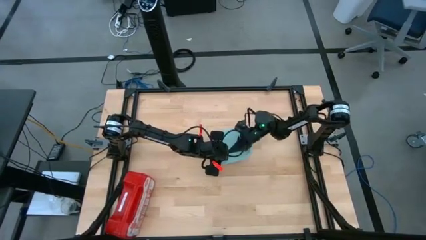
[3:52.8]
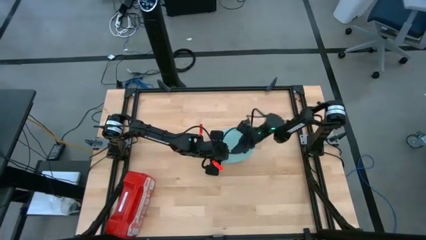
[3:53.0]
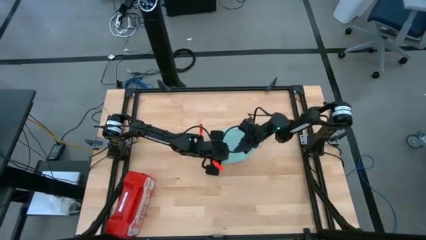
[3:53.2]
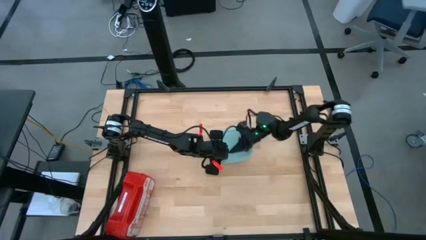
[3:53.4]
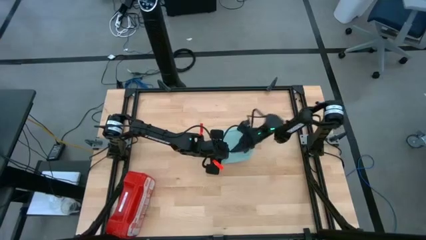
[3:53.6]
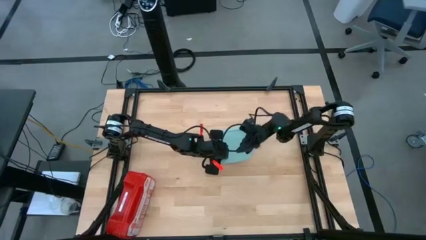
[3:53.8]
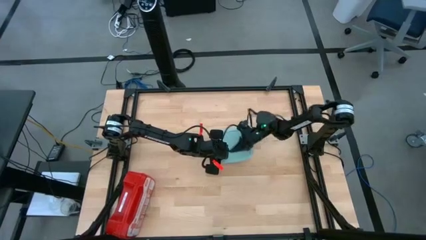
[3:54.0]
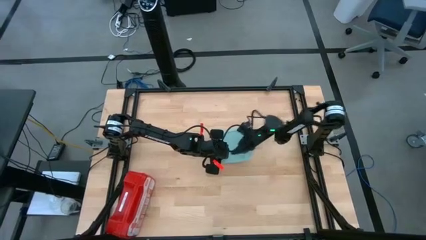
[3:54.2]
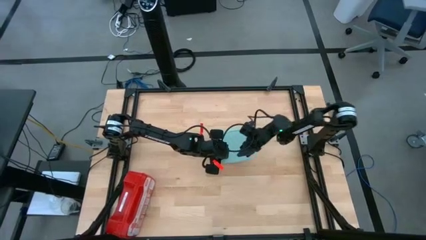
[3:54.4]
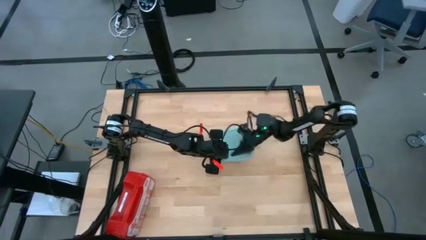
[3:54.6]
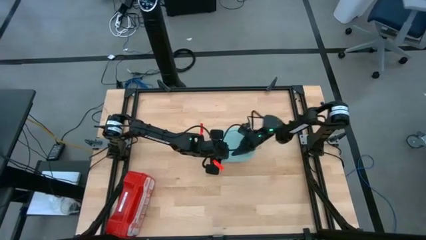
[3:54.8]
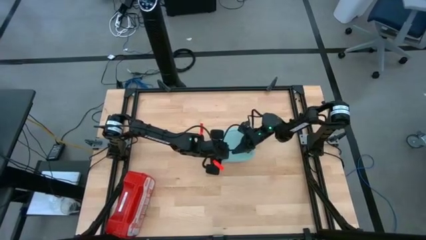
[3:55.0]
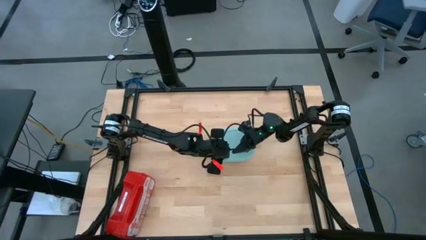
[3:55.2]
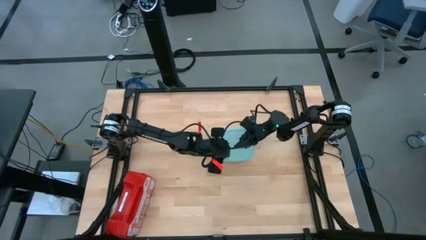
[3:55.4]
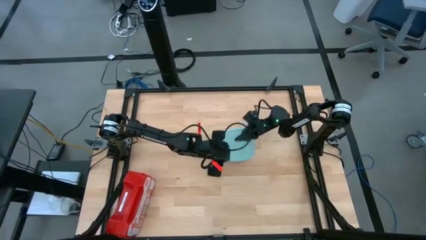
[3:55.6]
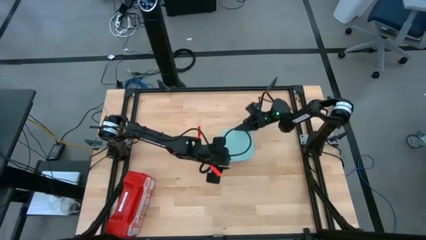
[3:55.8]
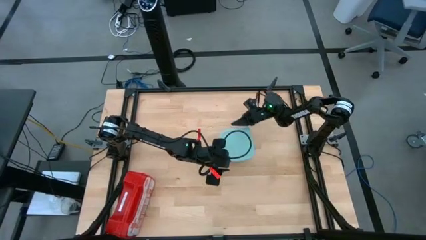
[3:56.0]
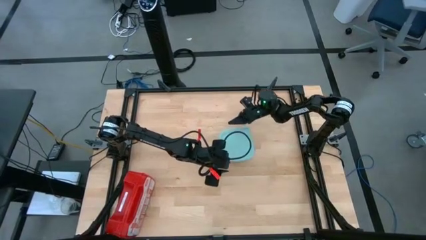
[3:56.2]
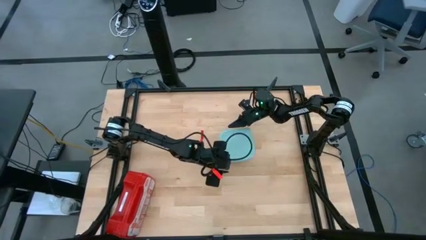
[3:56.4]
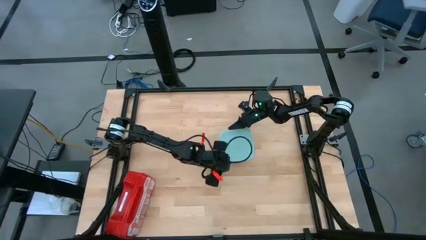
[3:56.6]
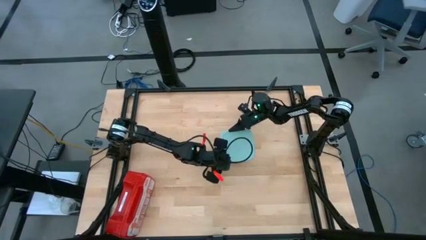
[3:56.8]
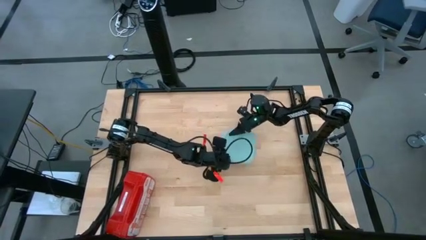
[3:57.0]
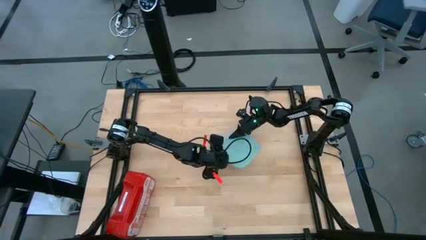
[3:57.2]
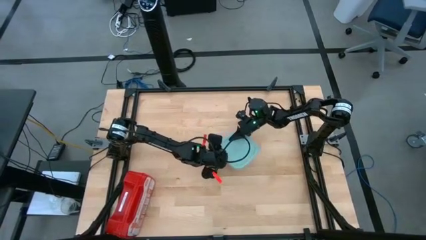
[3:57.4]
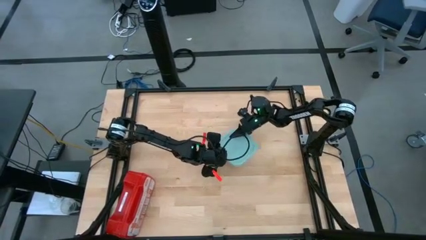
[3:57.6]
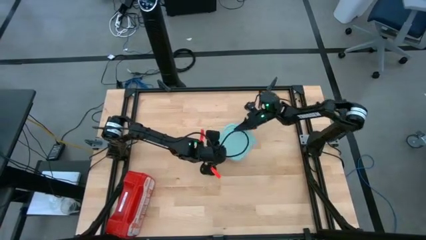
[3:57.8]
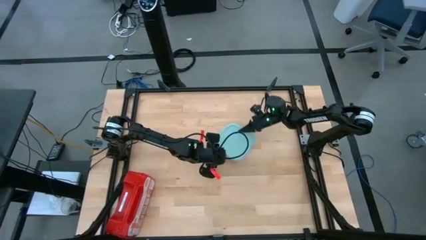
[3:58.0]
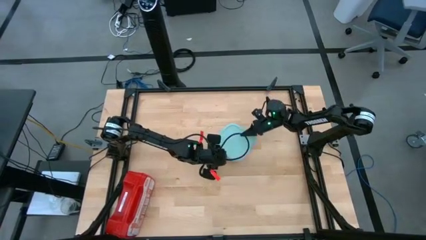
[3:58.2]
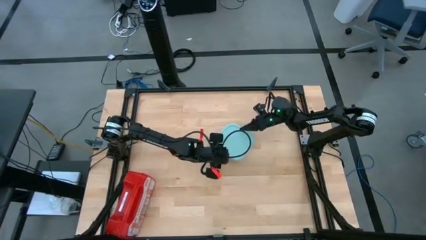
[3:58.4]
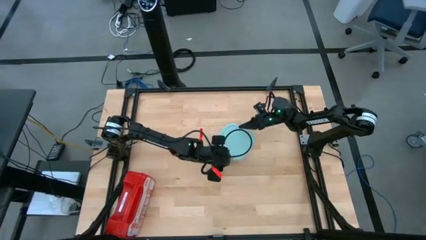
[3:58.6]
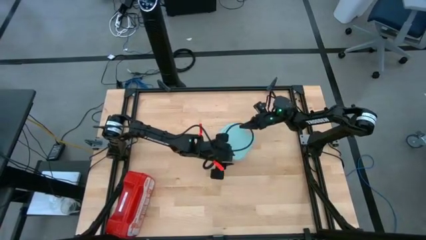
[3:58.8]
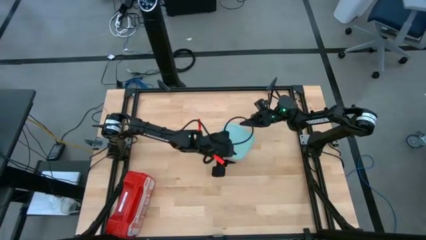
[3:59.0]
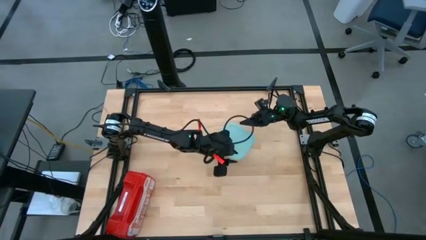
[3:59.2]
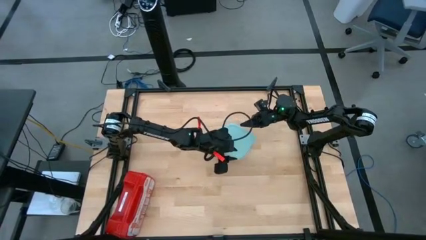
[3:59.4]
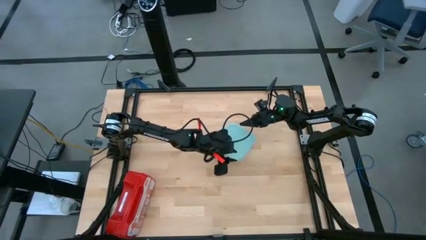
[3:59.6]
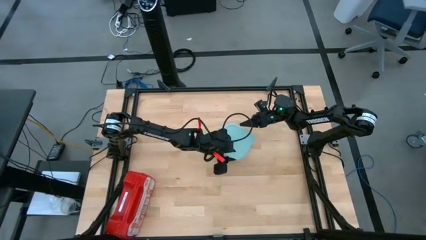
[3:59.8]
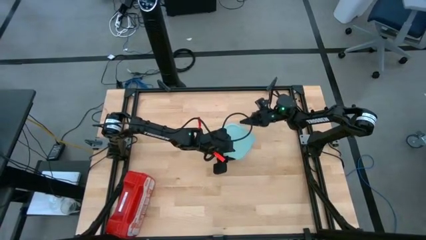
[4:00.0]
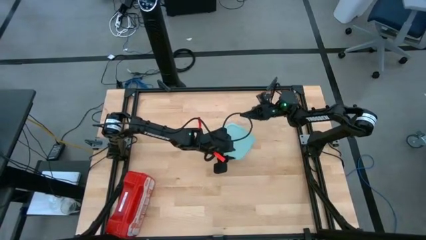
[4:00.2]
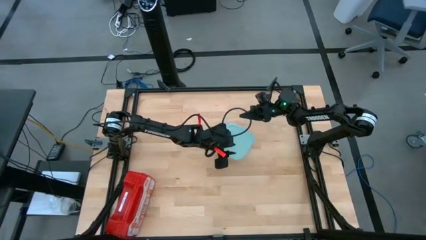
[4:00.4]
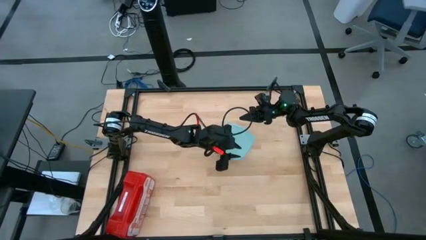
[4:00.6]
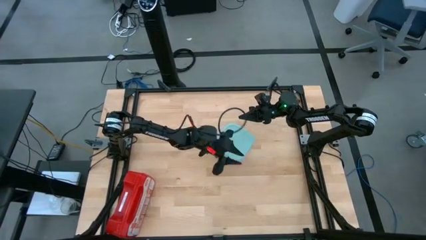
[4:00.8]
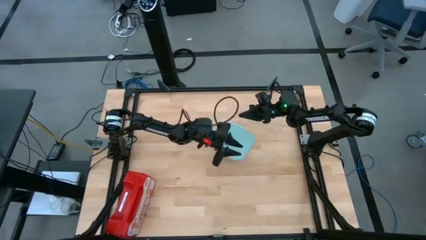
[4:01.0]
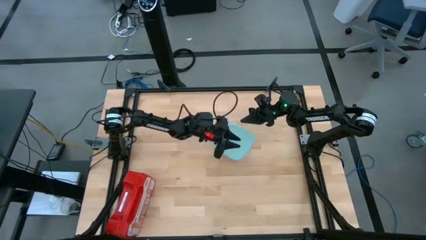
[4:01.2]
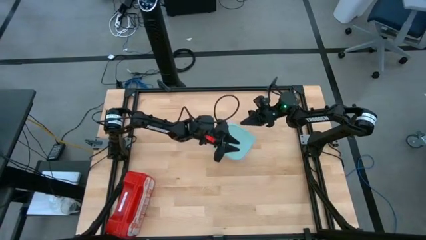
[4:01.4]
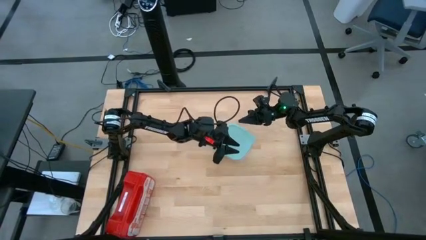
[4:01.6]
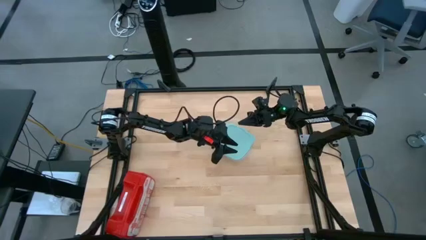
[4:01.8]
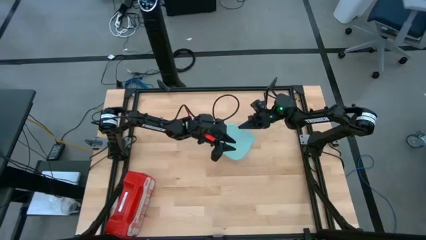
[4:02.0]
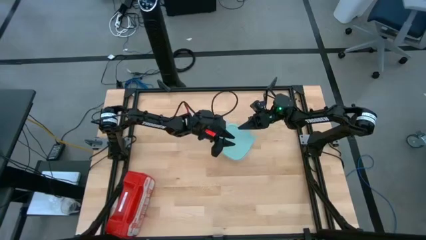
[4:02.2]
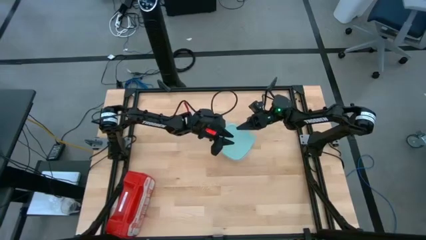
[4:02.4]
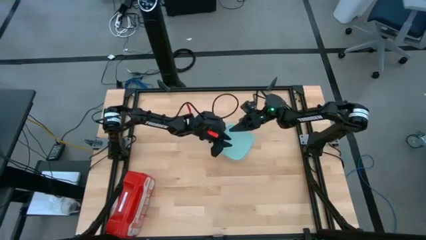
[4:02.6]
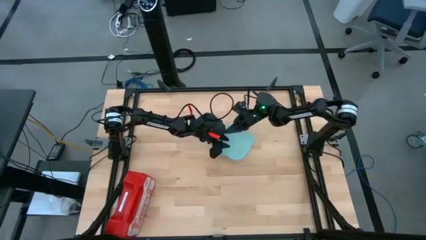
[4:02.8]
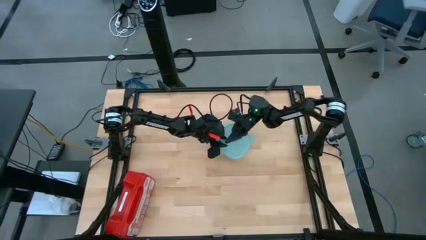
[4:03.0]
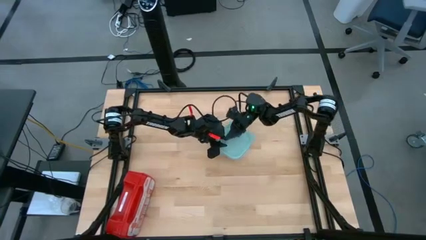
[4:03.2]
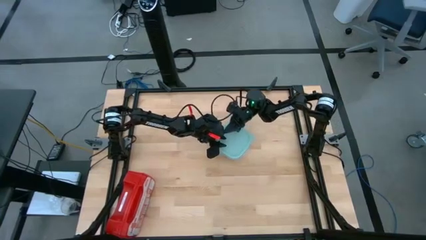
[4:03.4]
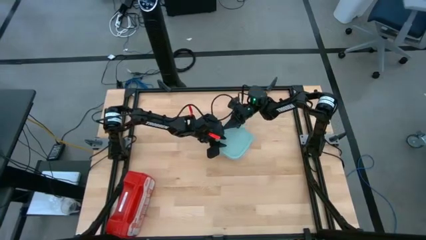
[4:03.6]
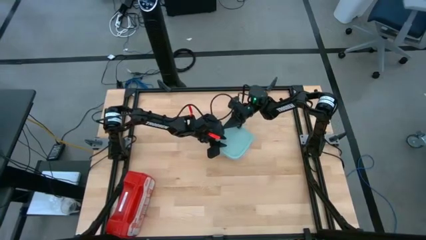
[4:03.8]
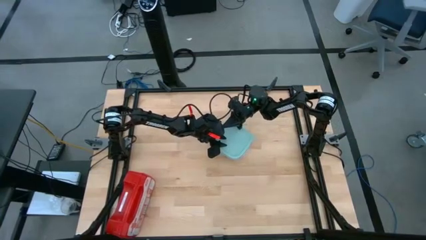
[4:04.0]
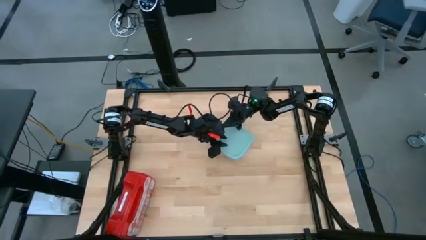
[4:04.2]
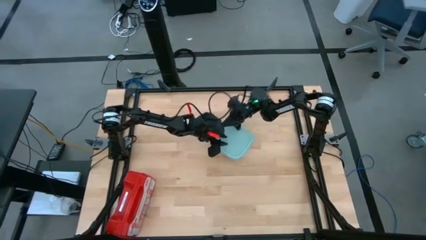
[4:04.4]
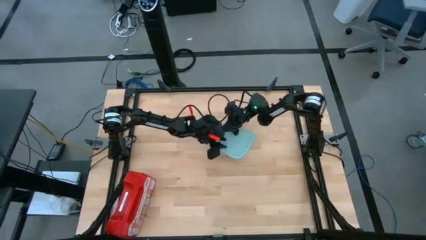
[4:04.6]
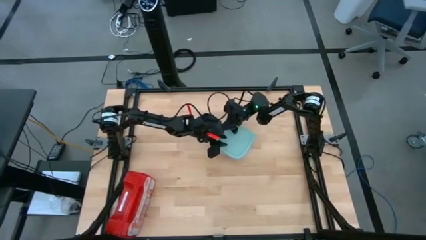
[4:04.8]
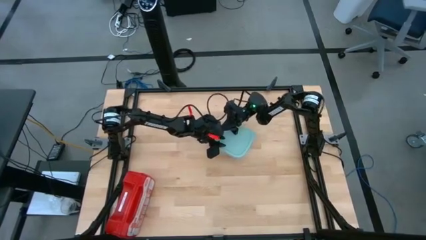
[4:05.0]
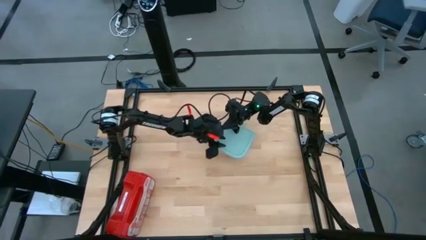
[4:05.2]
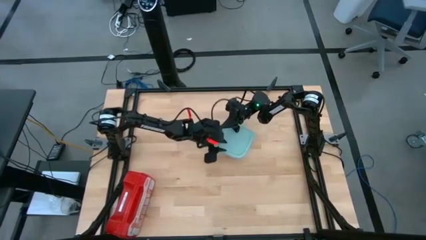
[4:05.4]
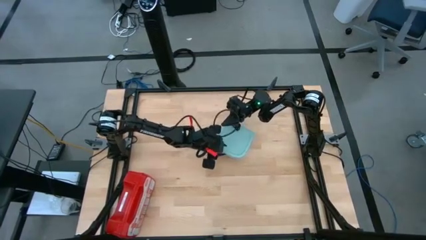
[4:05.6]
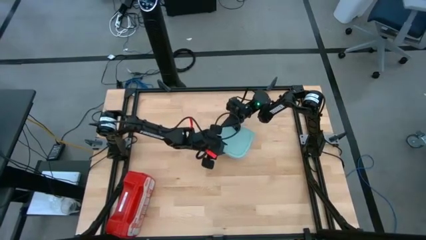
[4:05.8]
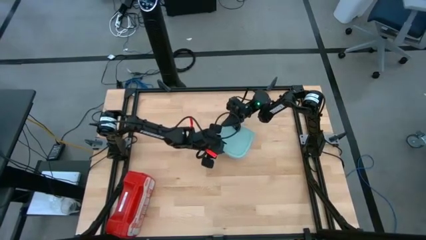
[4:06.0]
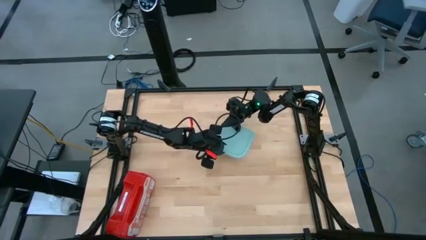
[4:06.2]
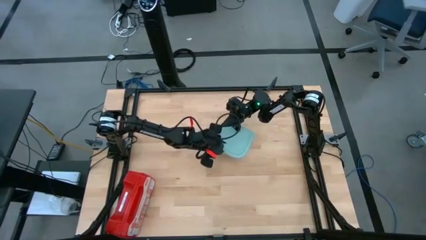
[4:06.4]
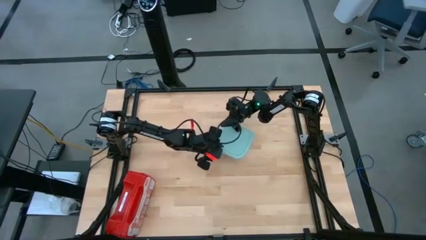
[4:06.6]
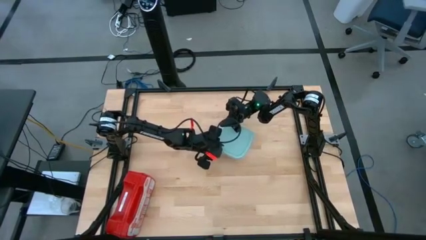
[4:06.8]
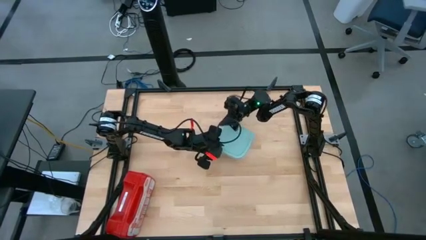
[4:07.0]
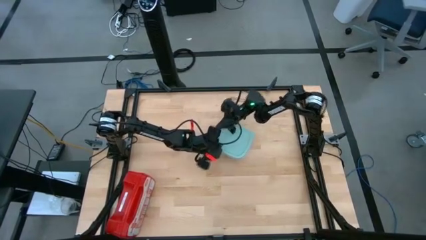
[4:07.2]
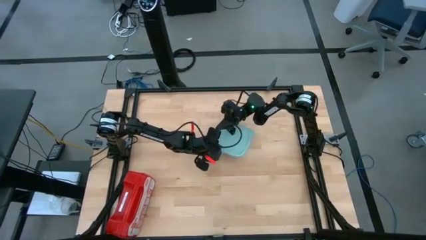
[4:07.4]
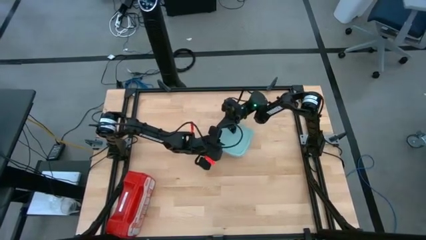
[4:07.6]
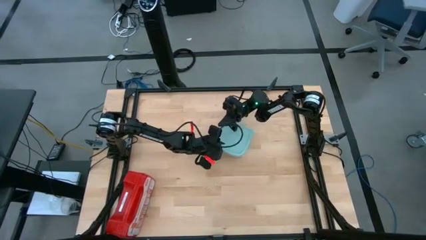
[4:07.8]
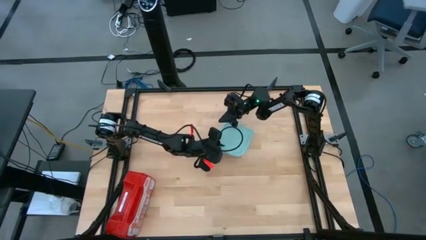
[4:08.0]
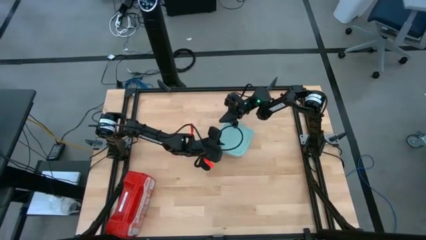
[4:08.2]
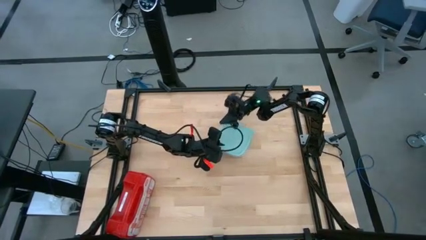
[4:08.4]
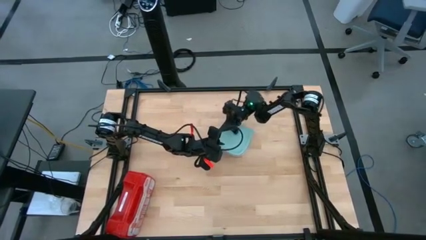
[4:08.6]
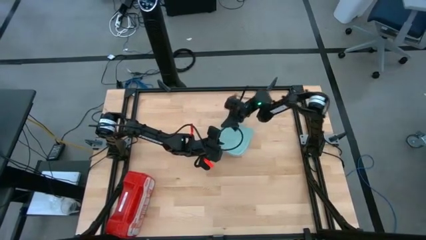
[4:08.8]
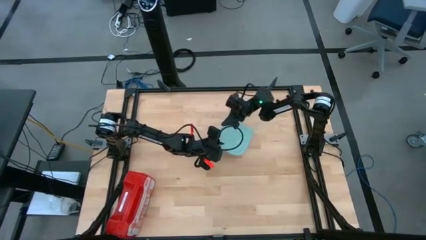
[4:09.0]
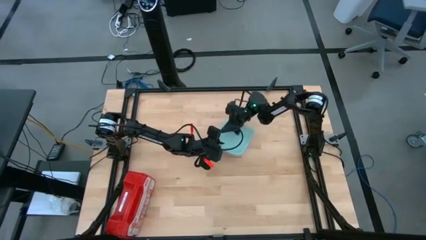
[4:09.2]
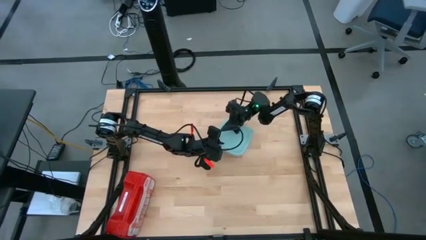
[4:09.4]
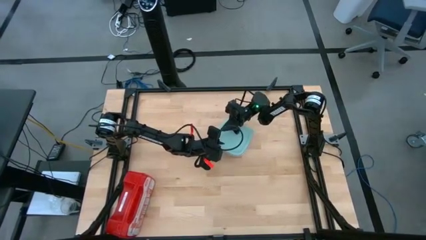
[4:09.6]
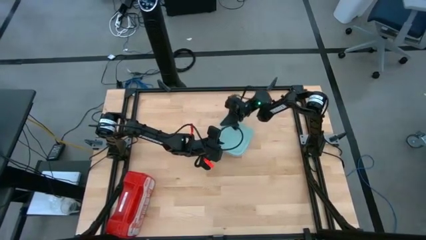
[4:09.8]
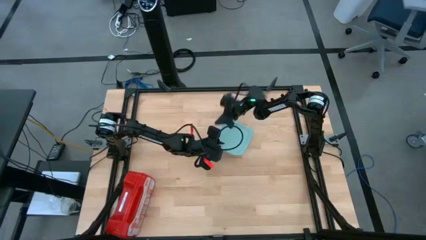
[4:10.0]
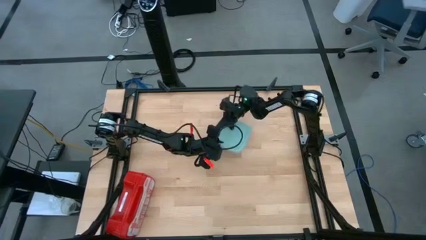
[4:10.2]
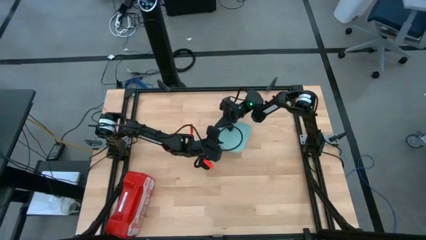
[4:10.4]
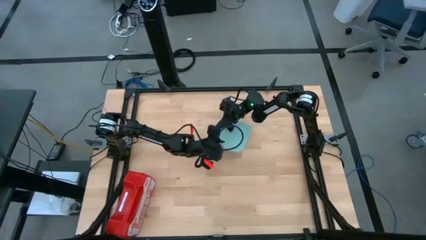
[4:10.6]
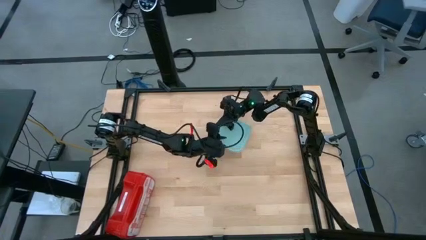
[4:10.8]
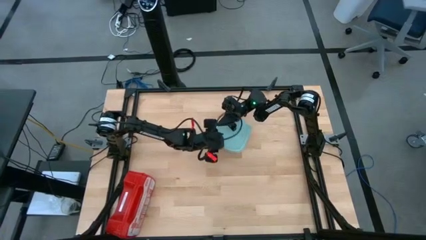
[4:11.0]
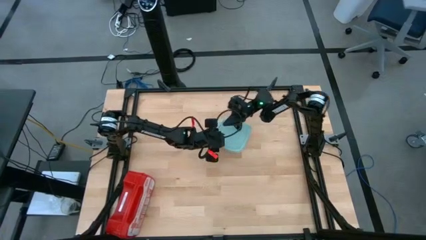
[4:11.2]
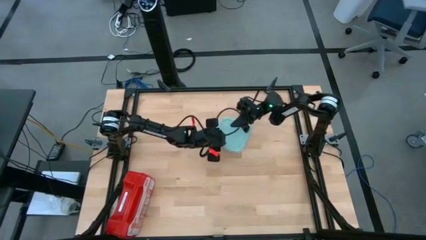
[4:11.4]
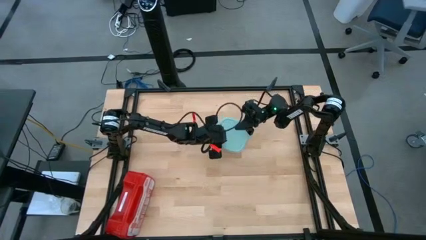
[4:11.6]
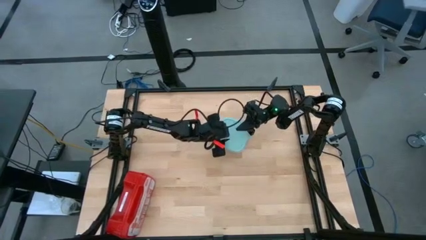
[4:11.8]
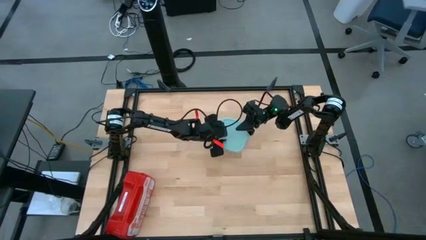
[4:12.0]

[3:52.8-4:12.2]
Task: Roll bandage
Close the green tupperware
